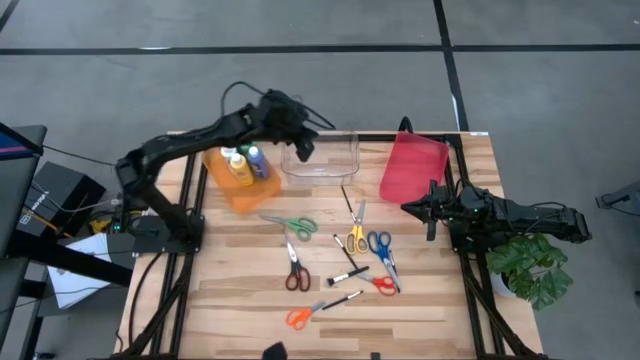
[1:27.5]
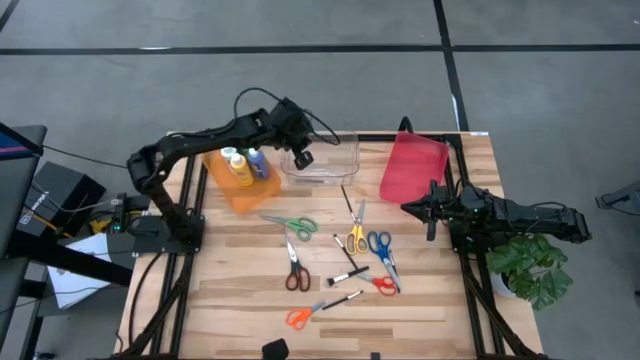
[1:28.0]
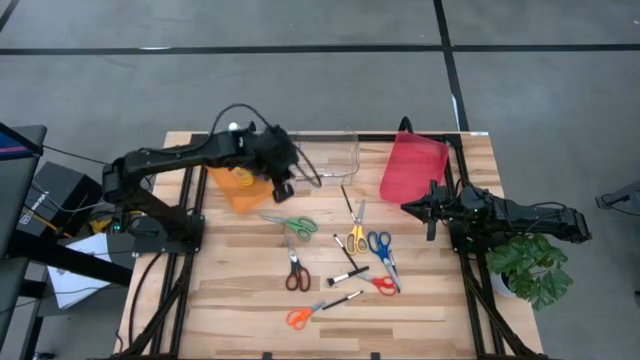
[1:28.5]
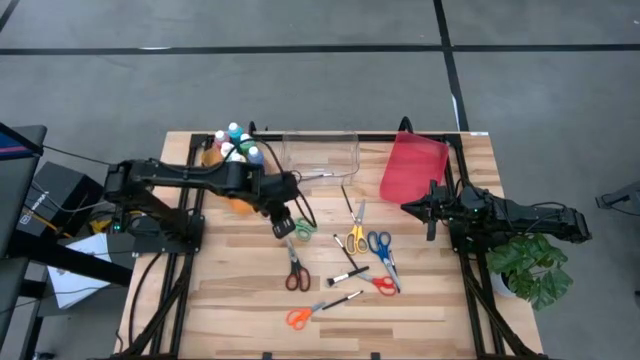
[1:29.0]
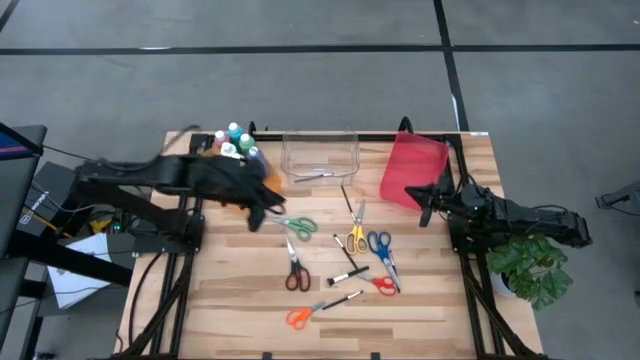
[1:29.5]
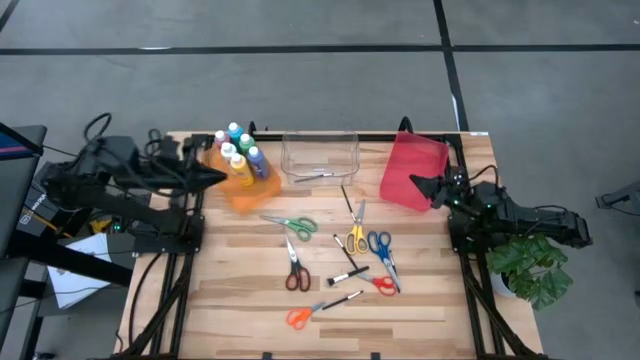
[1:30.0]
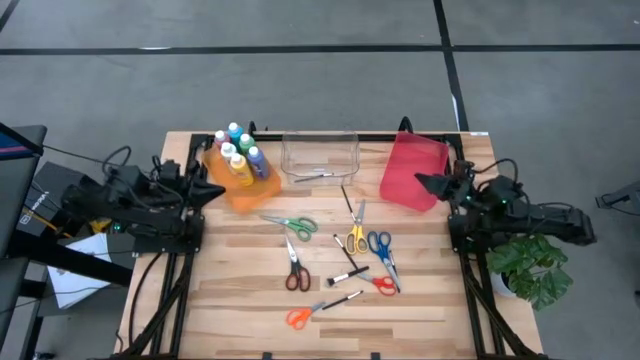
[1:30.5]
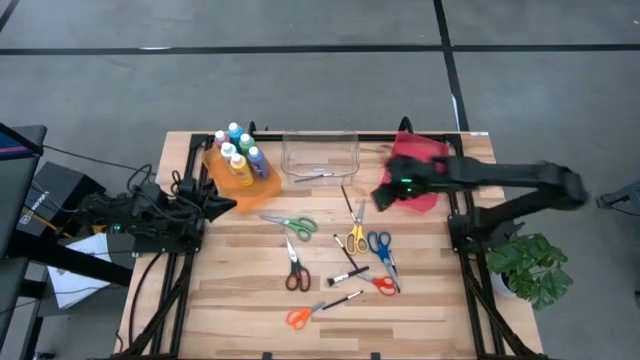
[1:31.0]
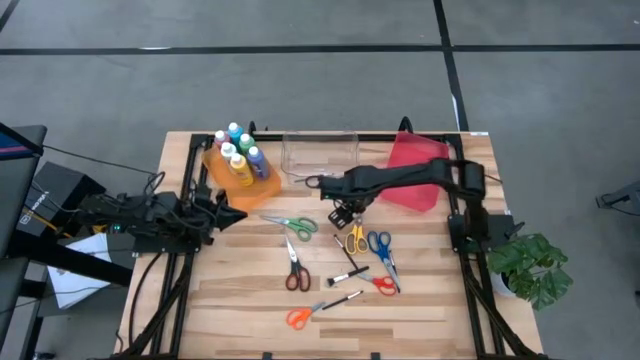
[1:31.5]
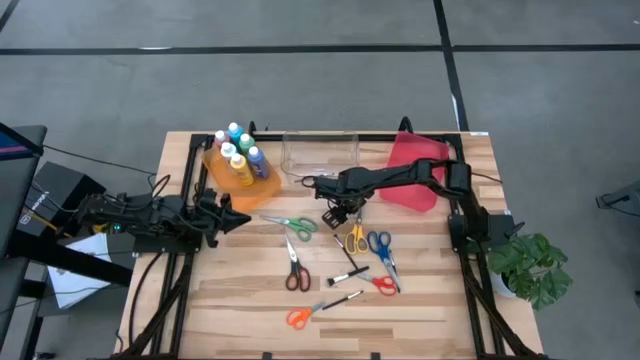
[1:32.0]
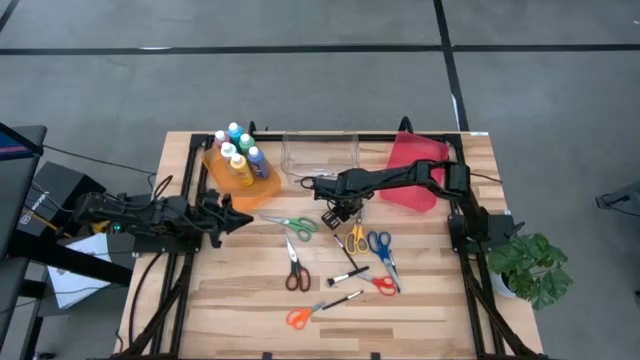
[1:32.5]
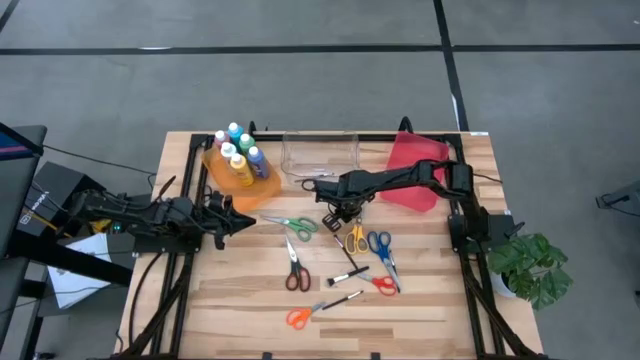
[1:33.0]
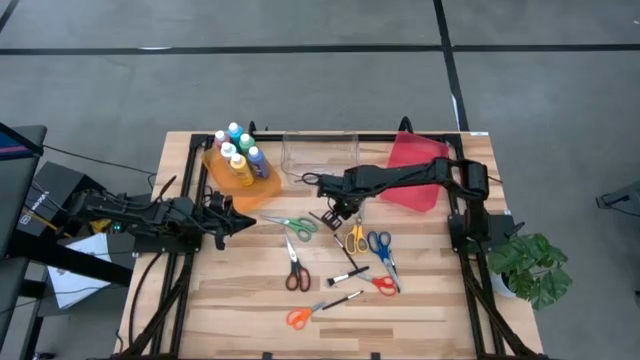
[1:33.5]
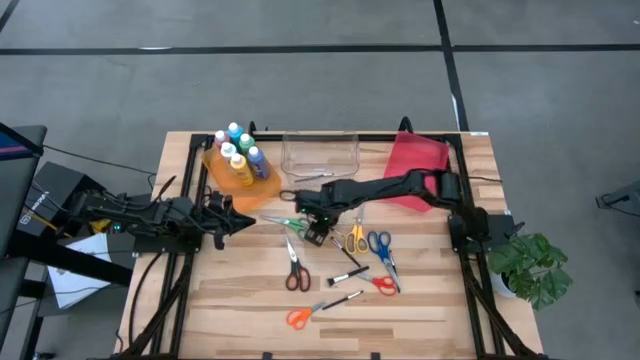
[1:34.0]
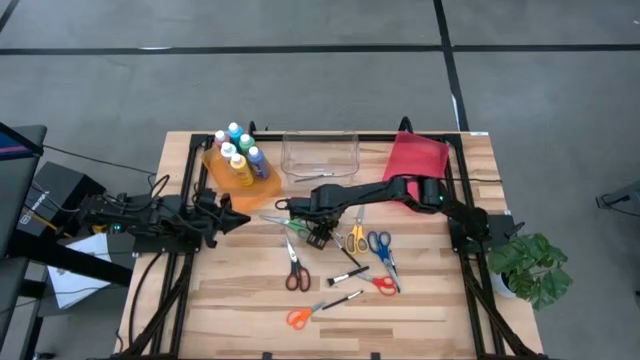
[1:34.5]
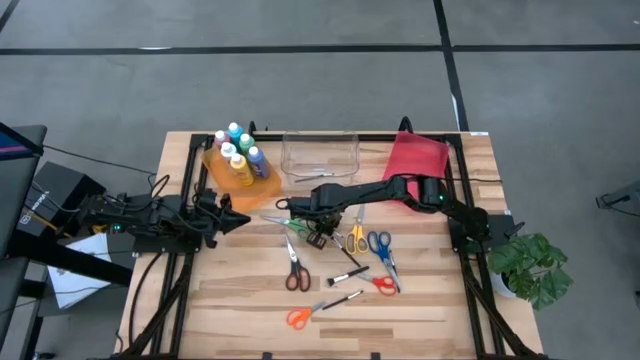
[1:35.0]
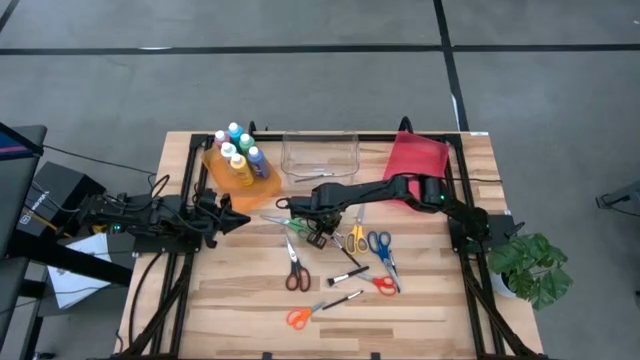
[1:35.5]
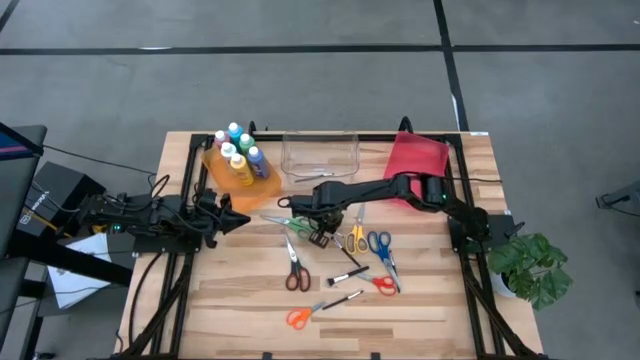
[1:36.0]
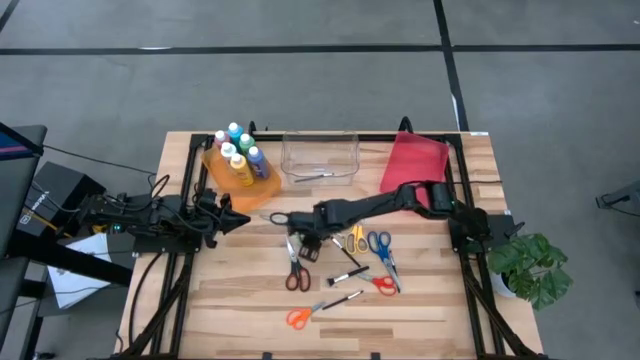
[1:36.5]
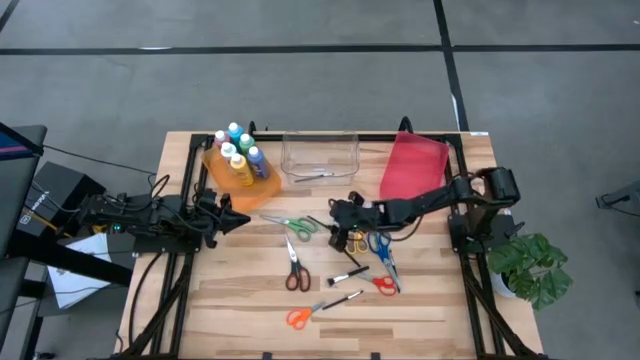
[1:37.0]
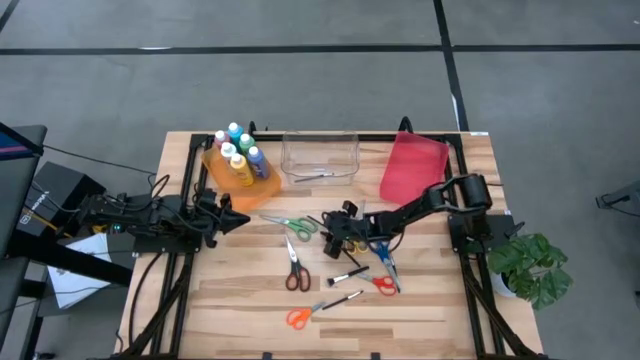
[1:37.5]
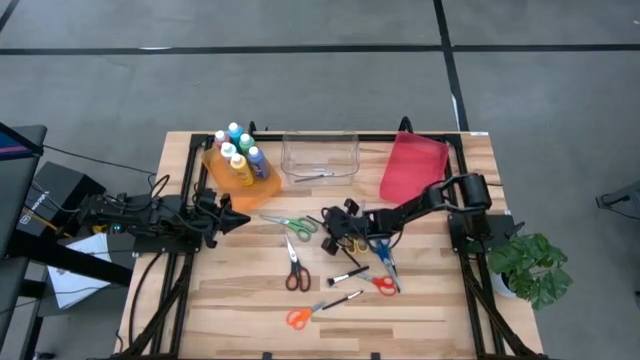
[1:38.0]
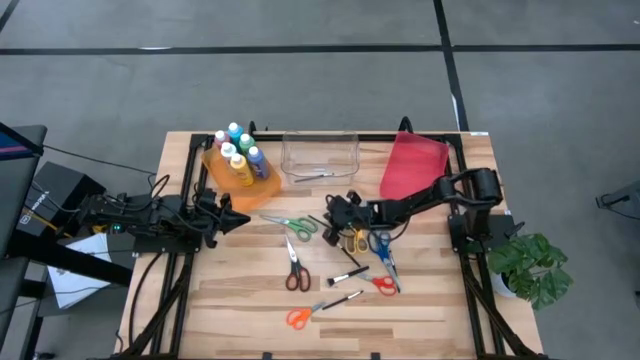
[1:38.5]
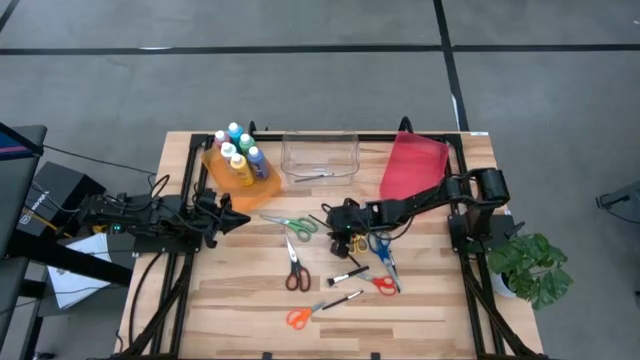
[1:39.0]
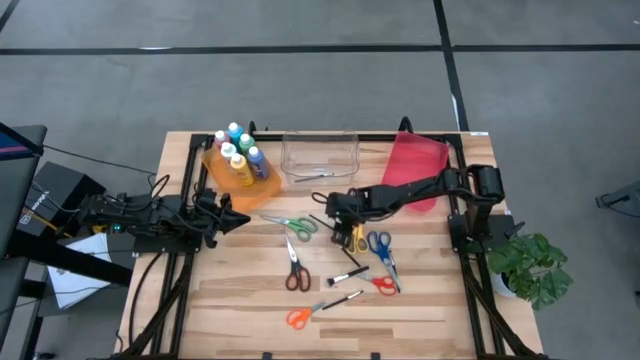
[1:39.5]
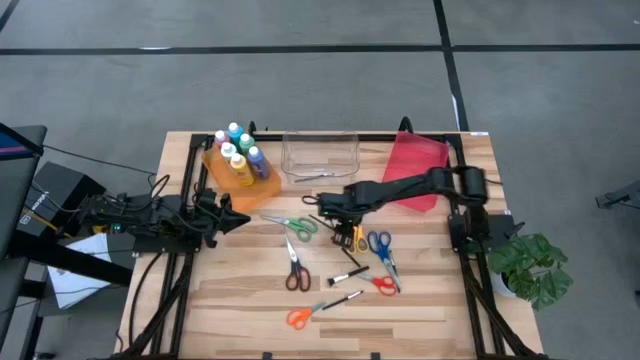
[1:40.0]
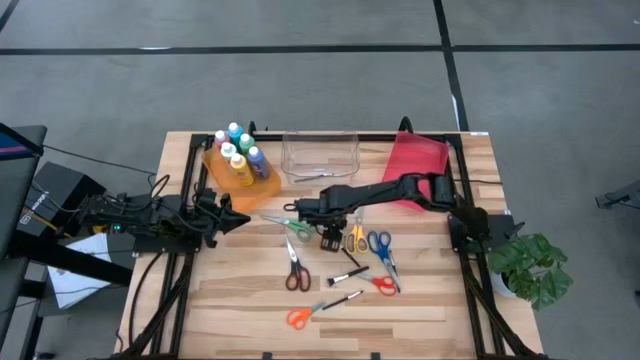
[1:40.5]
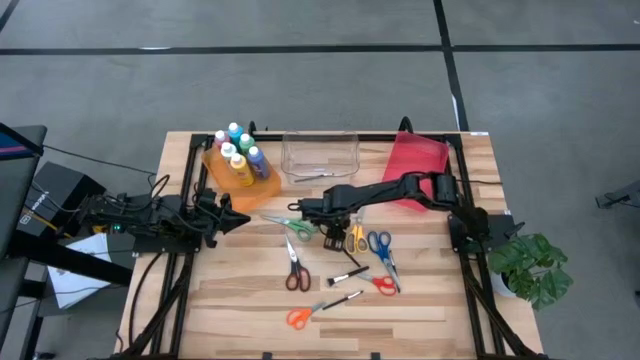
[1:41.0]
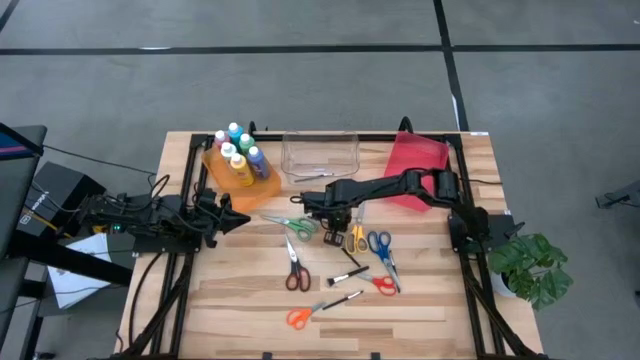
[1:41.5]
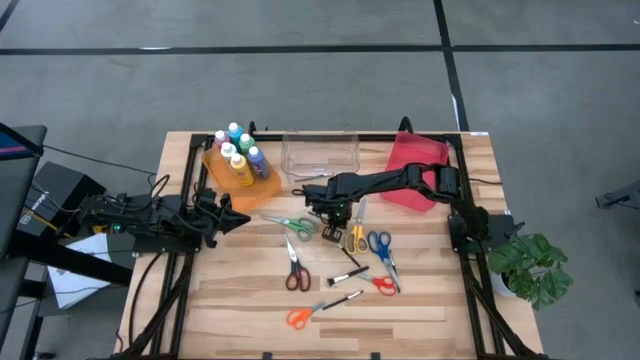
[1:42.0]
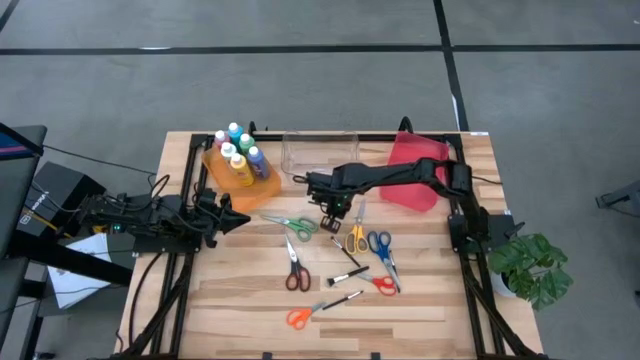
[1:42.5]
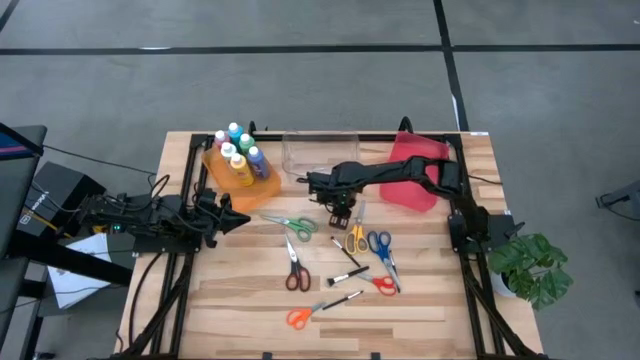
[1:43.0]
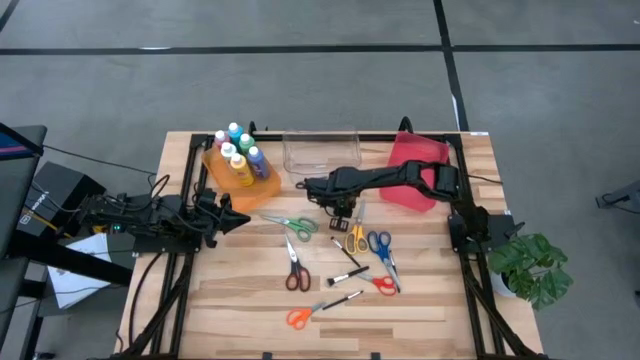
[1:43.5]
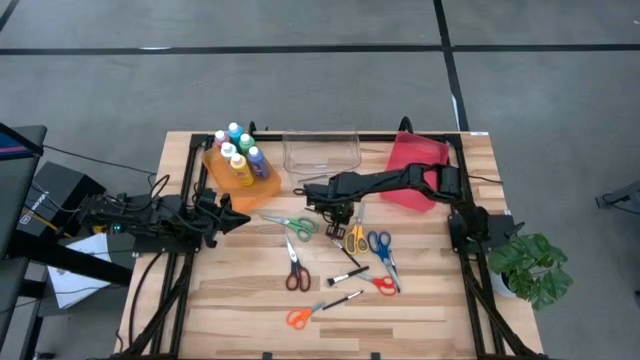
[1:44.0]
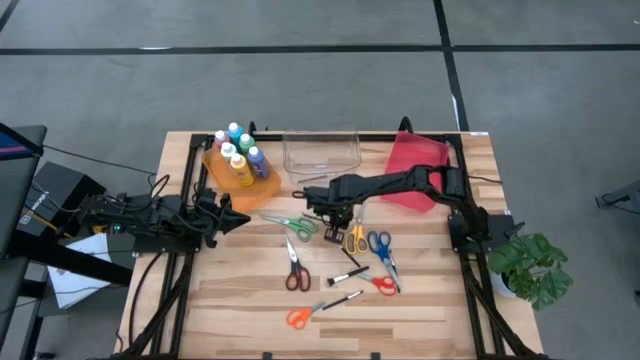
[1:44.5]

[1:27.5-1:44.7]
Task: Pick & Place Paint Supplies
Put the black paint brush into the transparent bin

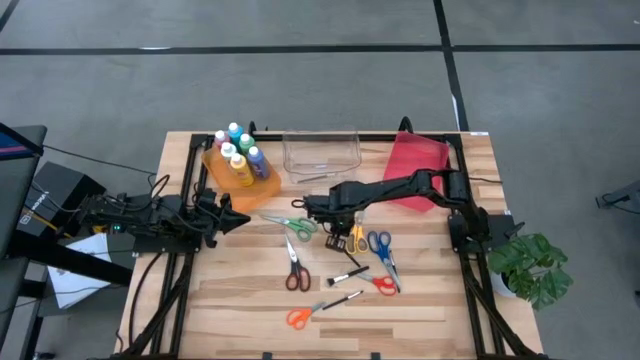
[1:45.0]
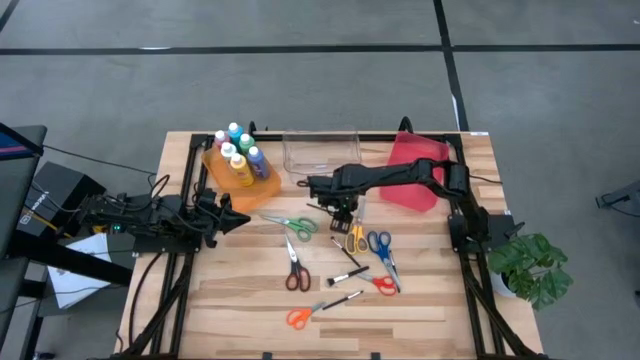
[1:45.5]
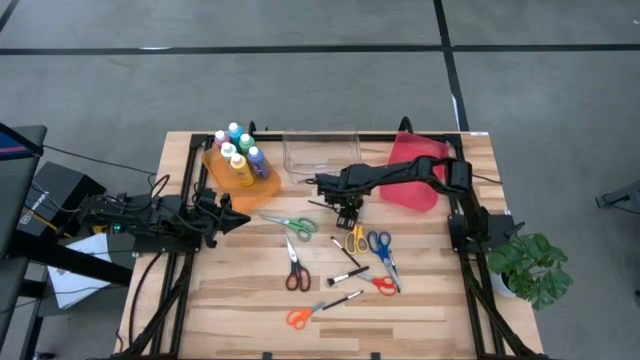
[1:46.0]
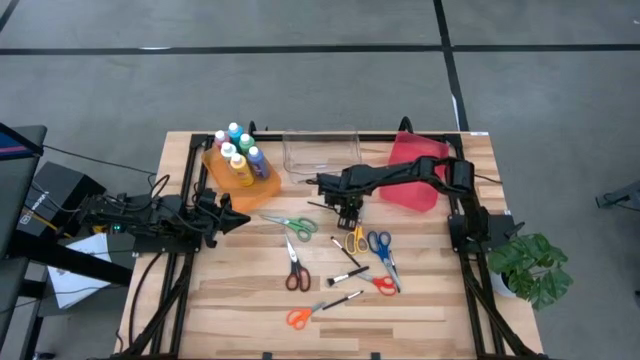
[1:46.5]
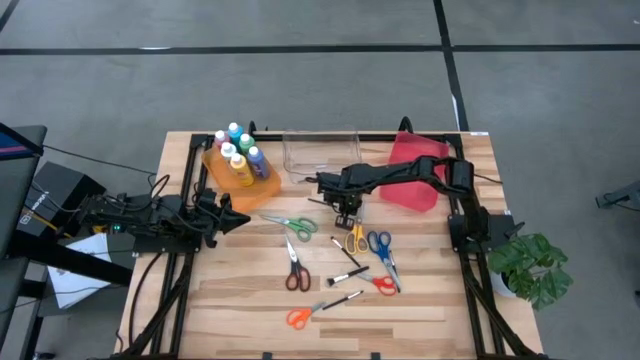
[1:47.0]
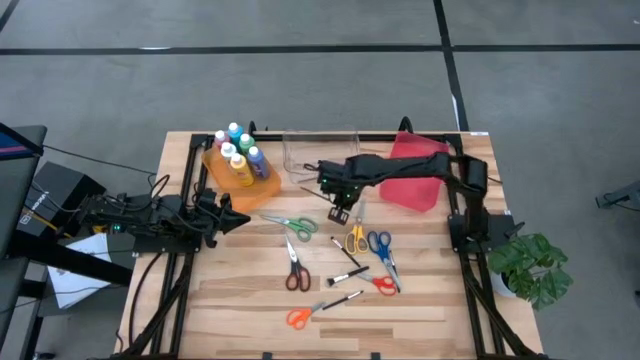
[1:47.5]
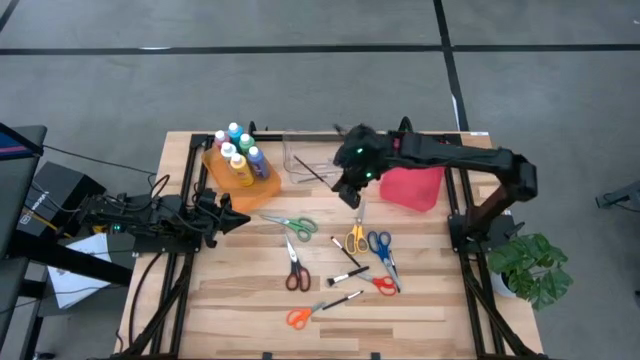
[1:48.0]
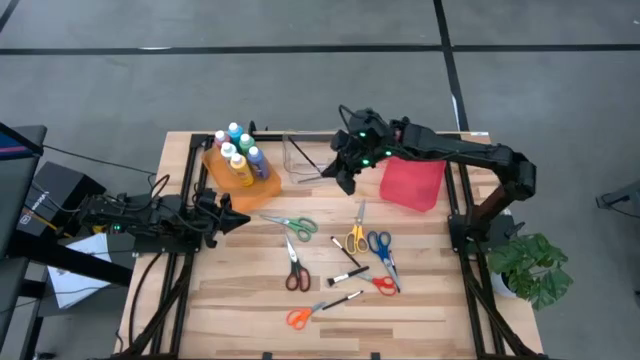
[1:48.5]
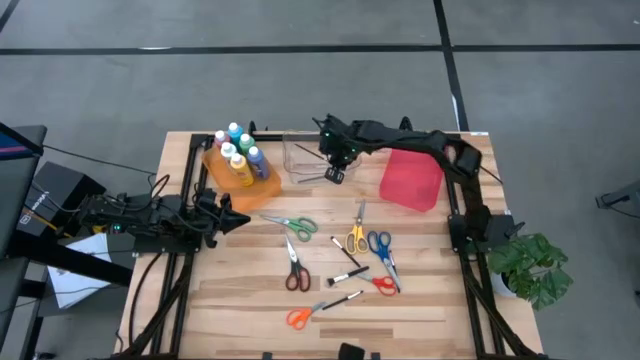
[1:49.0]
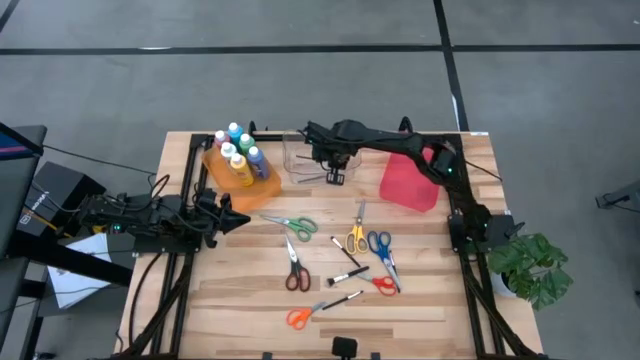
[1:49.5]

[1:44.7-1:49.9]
Put the black paint brush into the transparent bin
